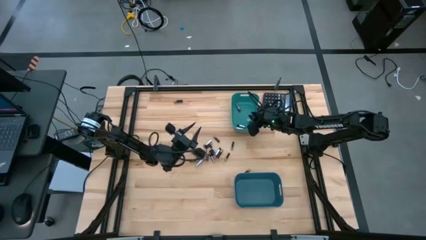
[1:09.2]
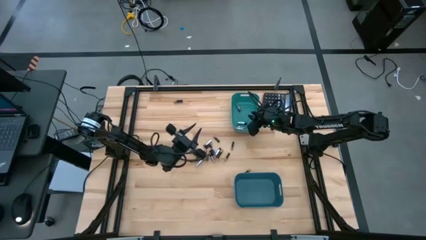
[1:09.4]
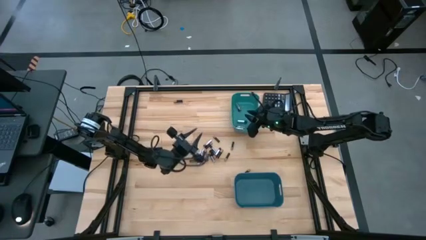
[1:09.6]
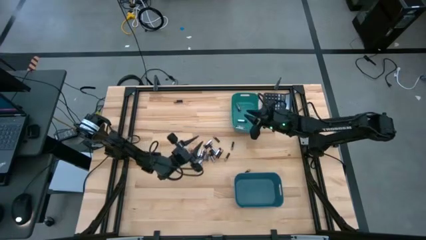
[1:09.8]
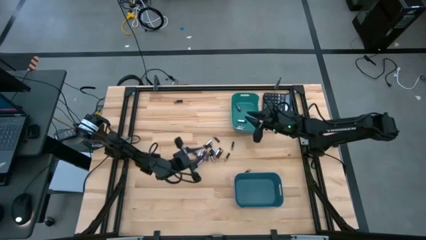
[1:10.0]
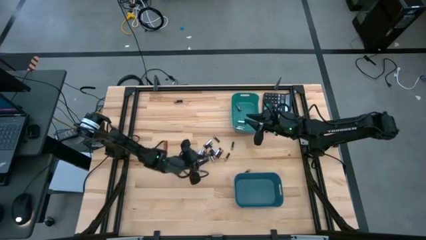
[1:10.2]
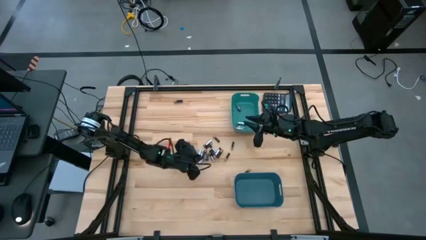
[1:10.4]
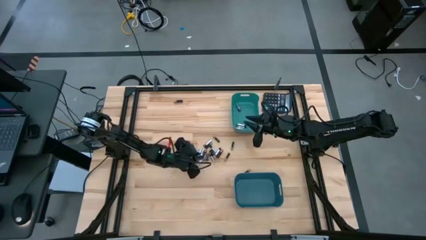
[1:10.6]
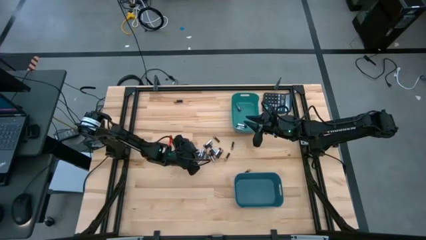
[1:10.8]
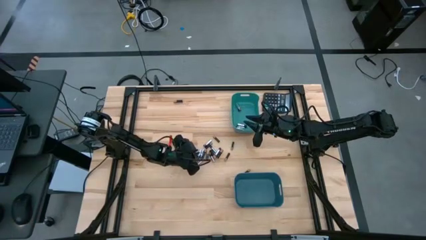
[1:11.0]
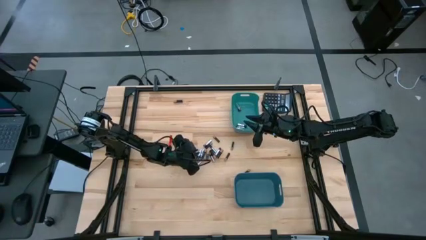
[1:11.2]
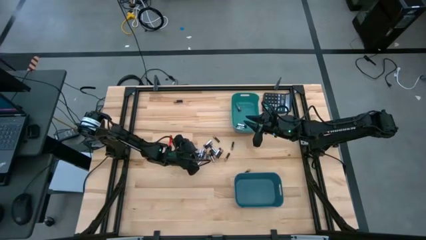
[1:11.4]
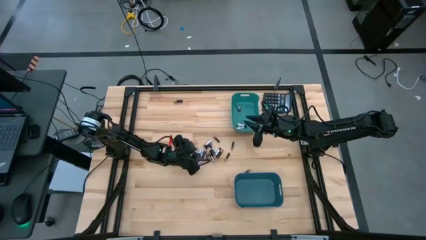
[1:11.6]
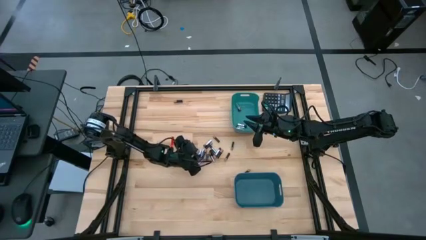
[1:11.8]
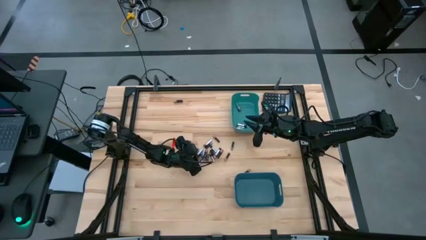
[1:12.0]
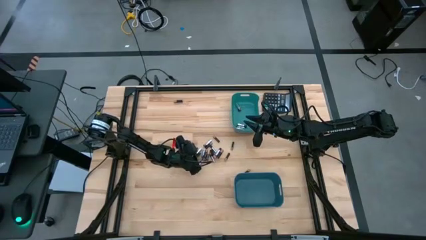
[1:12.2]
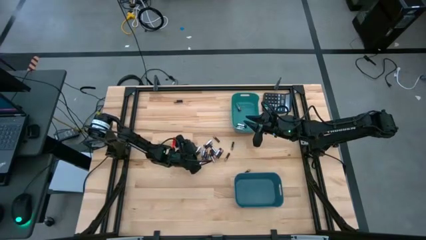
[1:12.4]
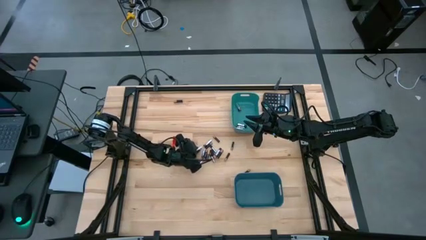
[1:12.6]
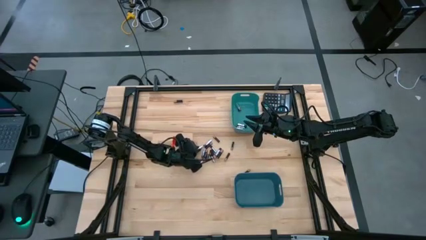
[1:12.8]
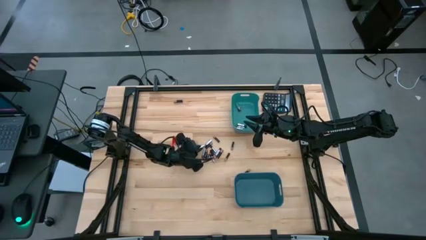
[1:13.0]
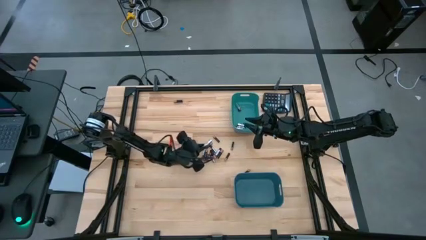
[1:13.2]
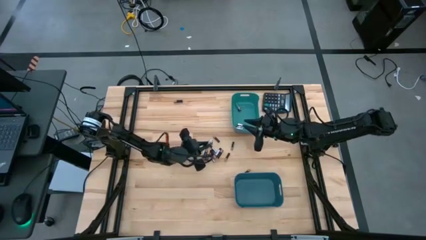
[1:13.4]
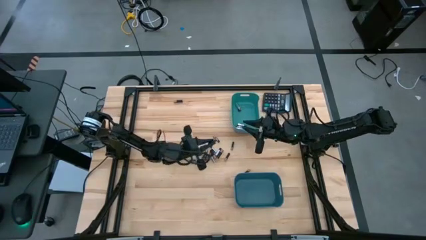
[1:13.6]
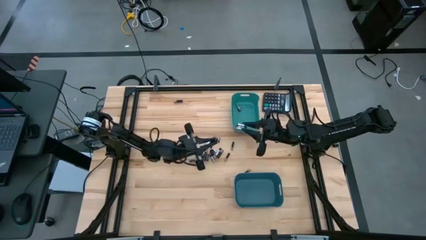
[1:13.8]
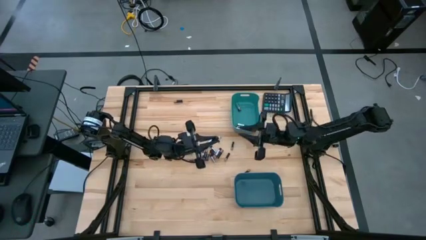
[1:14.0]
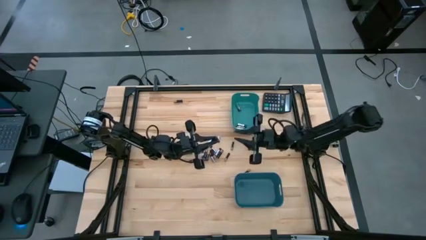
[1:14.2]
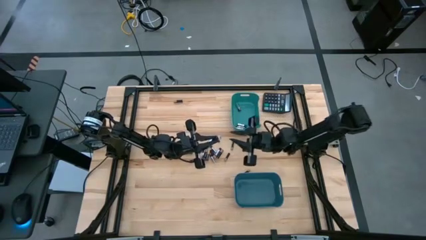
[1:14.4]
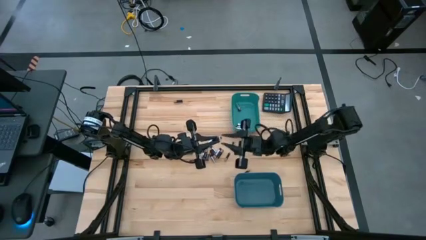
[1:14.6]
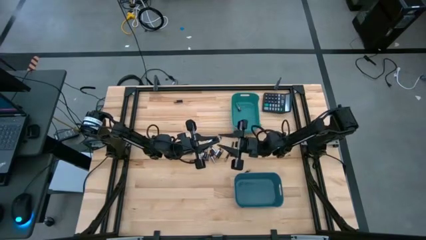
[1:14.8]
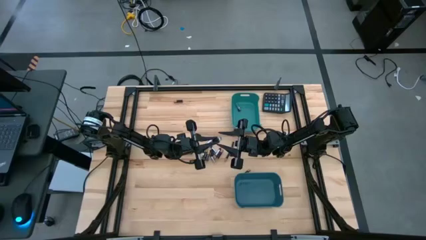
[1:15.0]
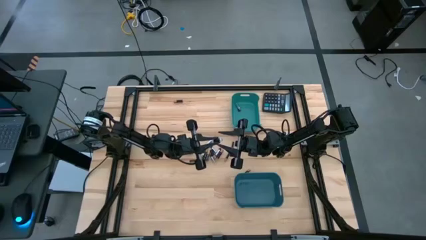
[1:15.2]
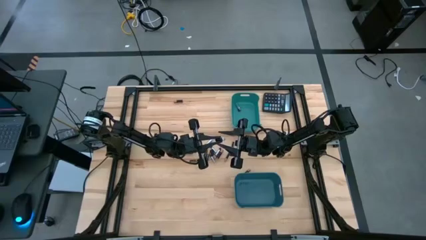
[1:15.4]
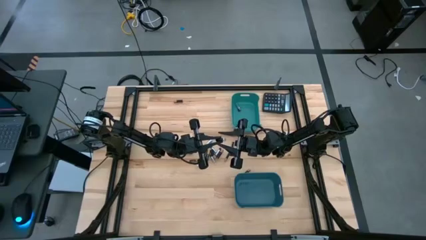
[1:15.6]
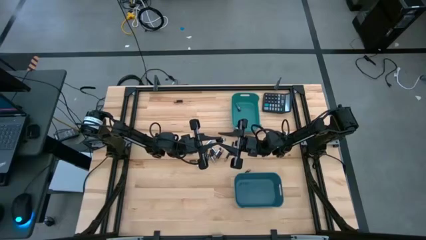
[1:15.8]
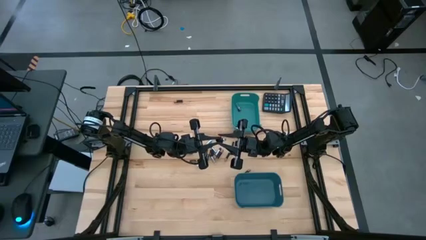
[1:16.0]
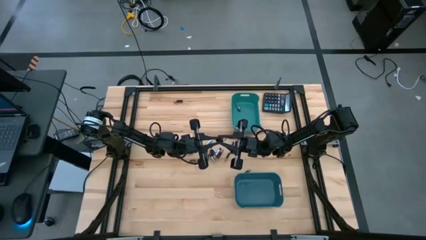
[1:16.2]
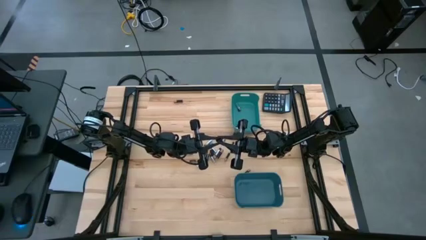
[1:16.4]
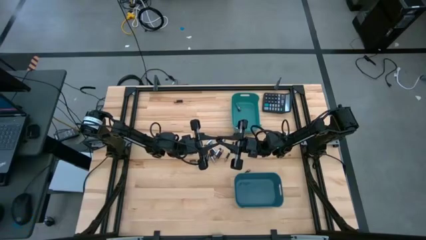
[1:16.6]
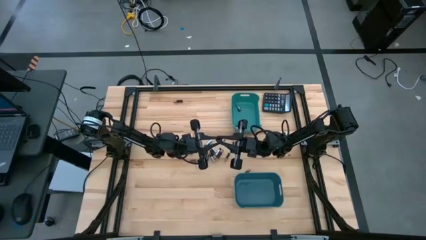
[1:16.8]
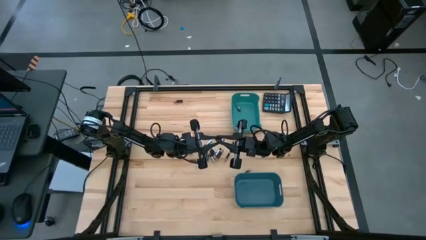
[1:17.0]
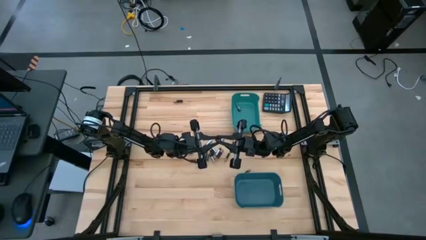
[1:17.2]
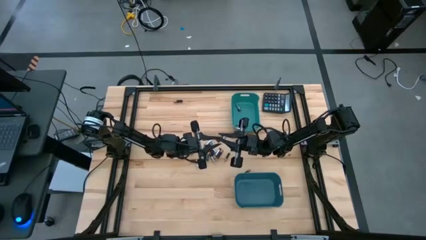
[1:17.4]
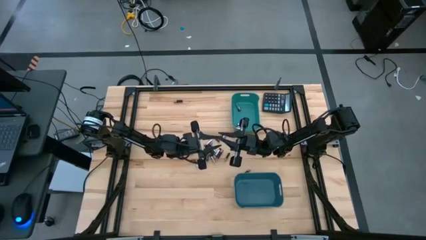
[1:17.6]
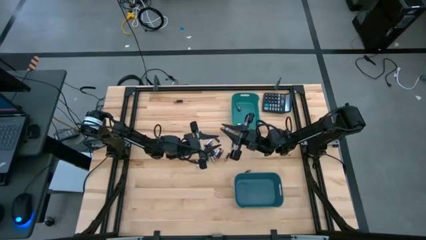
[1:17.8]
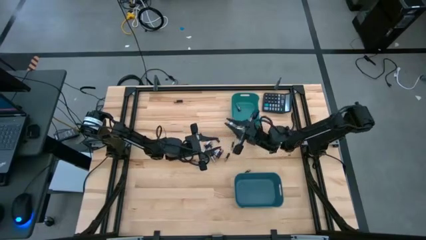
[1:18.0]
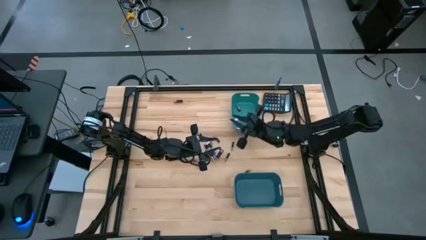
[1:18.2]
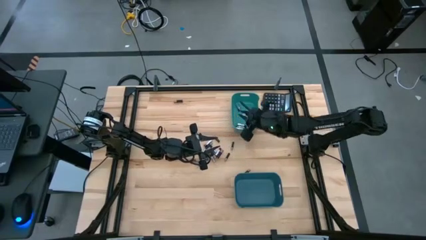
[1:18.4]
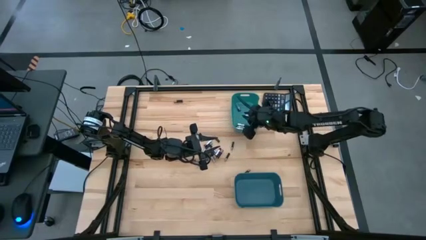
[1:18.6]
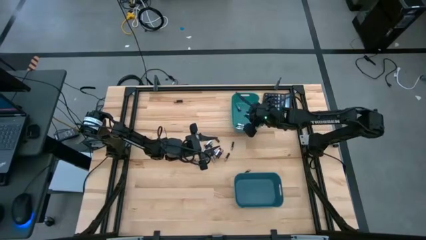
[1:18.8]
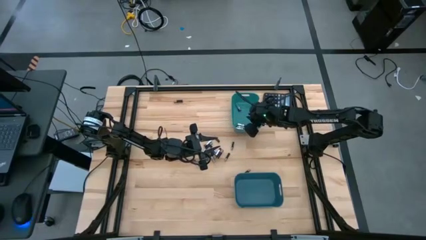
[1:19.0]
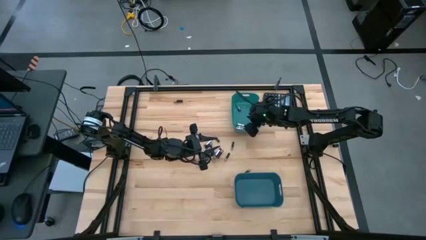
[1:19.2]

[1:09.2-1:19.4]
Task: Sort batteries
Put the silver battery into the green bin

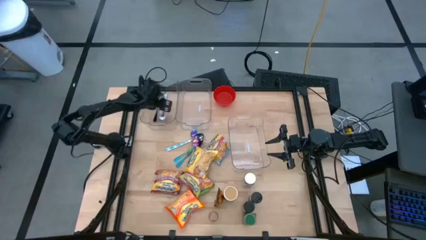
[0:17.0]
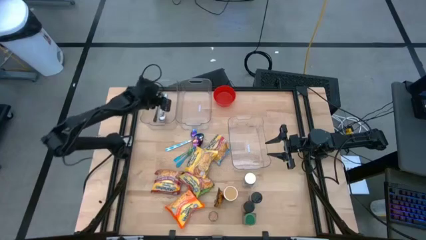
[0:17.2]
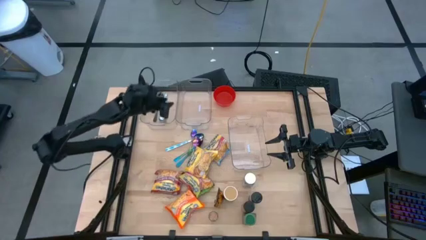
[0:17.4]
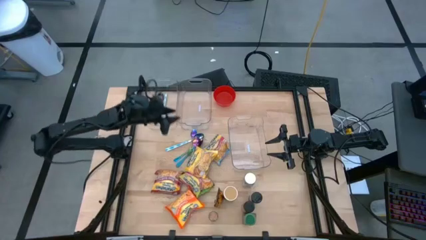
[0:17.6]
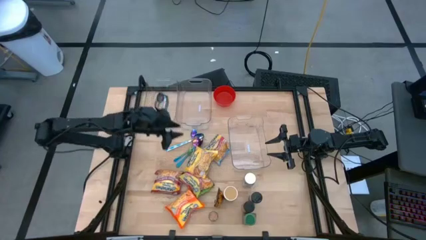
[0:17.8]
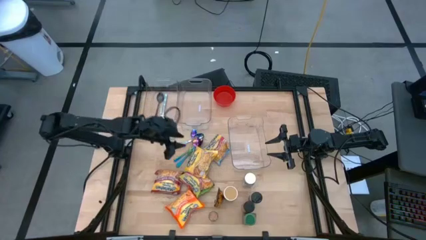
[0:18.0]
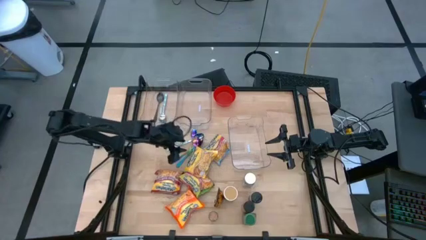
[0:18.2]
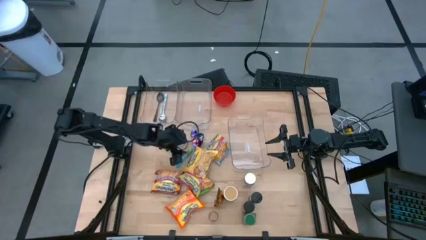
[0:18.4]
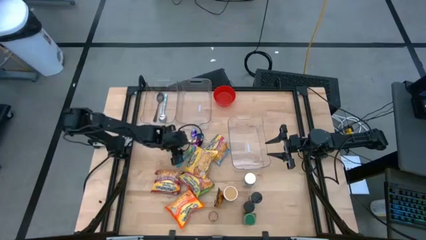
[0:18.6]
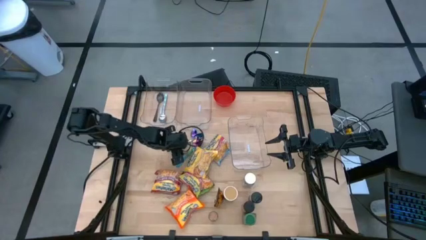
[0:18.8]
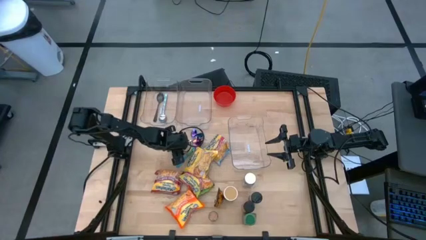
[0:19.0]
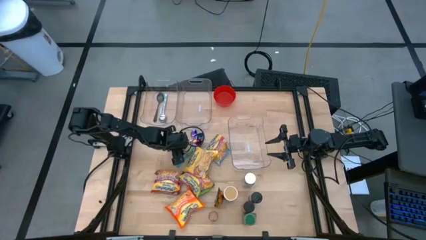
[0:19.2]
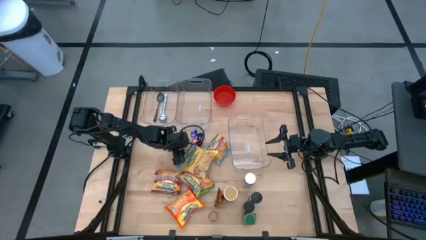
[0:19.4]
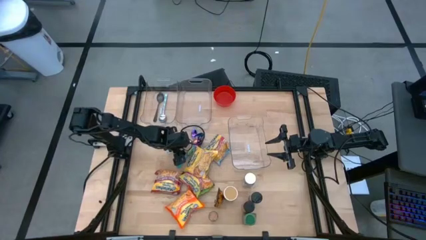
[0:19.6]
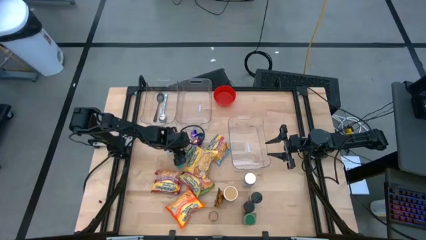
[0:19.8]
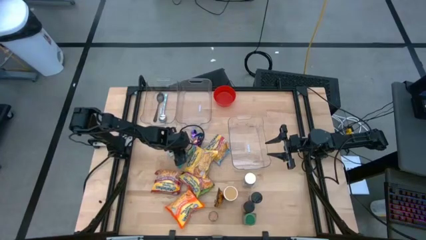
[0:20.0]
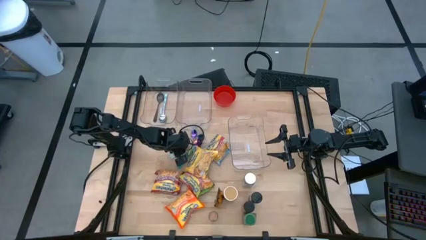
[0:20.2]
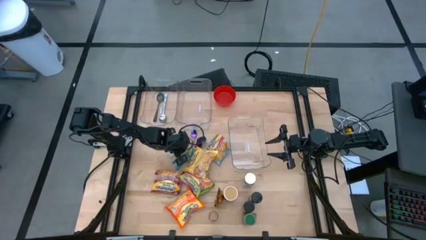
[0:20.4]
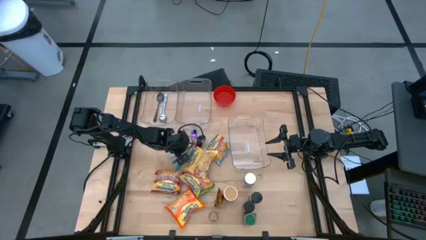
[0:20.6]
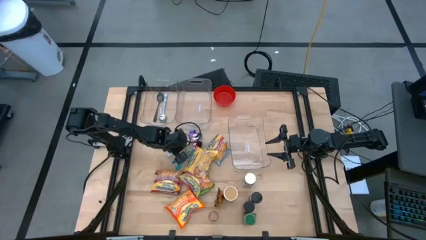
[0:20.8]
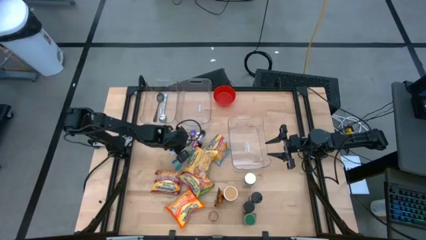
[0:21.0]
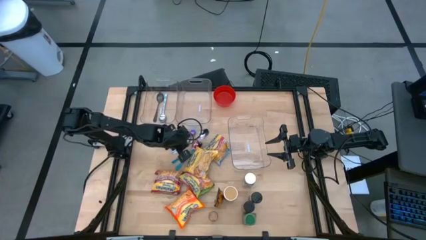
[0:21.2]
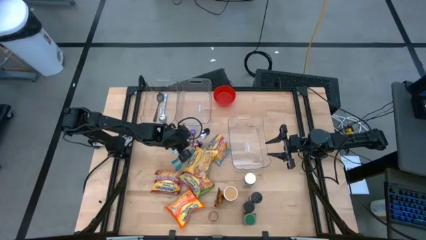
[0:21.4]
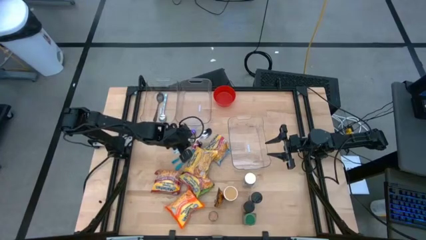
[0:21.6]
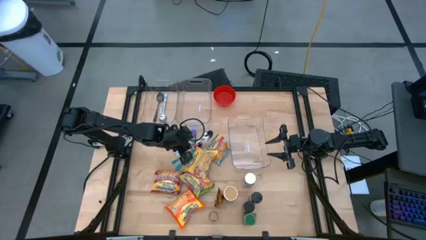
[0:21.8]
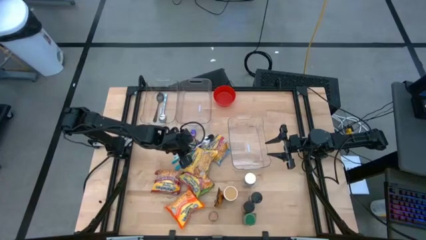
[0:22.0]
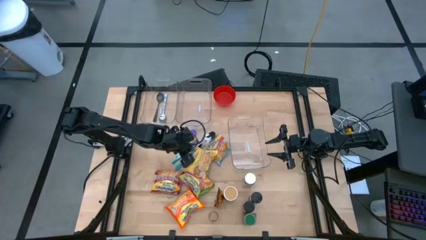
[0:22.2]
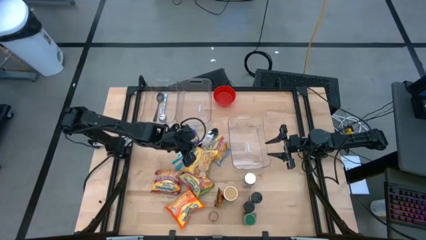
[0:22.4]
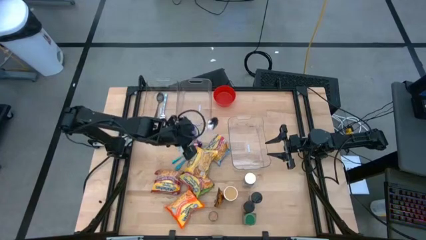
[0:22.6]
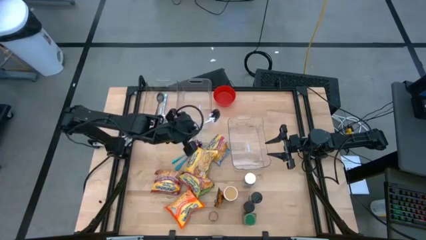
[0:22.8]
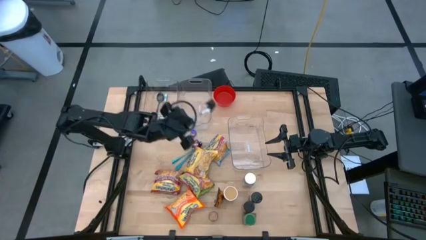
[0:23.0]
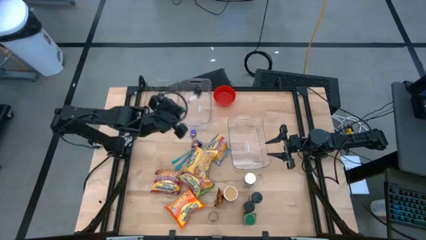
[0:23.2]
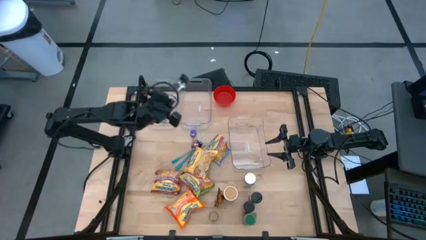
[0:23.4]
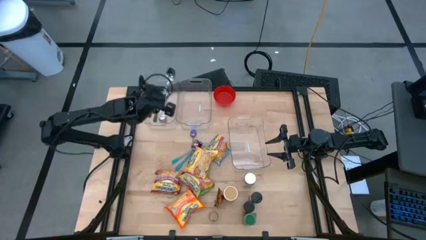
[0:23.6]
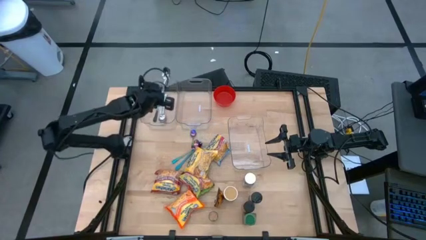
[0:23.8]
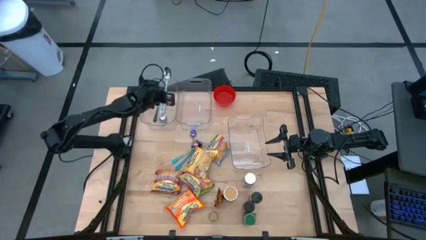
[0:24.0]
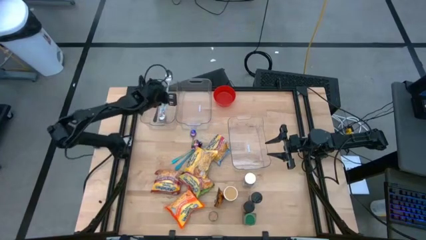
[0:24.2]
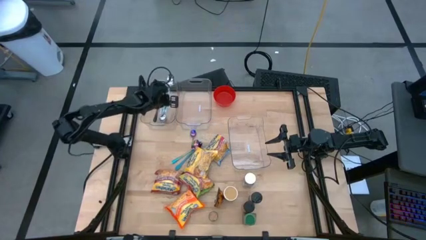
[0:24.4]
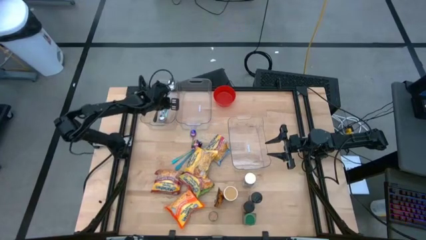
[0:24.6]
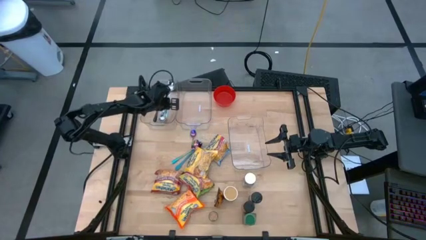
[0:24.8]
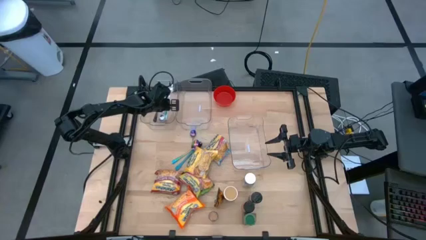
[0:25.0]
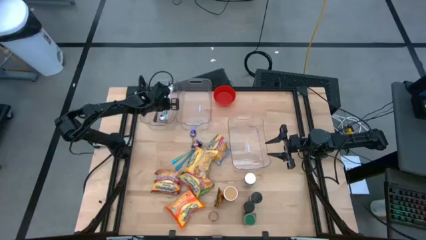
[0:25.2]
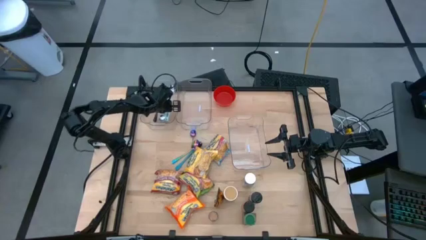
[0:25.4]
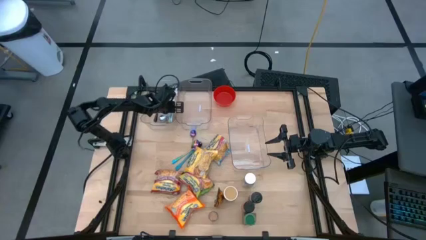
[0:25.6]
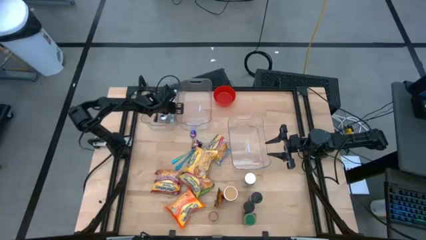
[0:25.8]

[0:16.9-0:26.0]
Task: Pick & Place Food Item
Put the blue patterned spoon into the top left transparent bin
